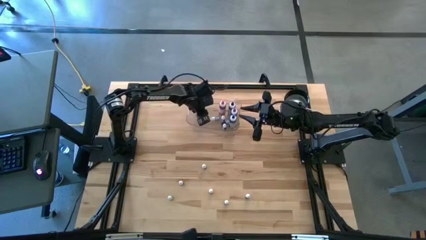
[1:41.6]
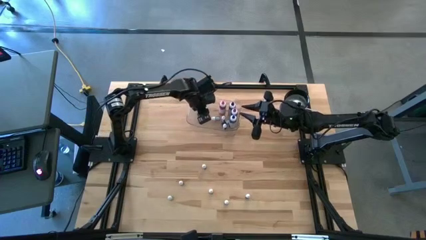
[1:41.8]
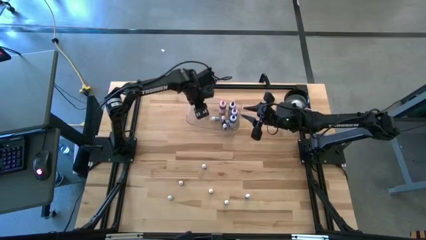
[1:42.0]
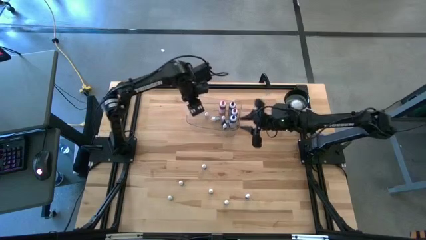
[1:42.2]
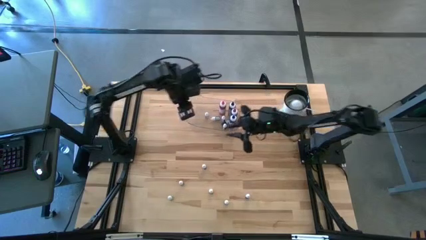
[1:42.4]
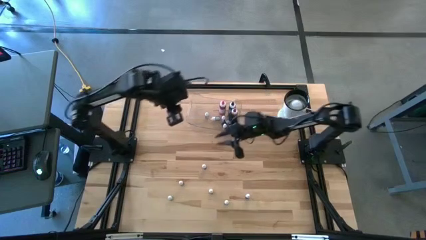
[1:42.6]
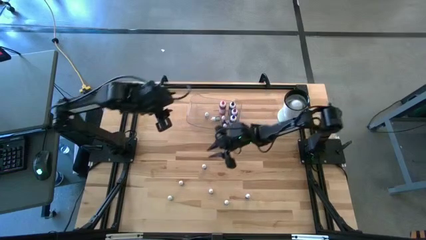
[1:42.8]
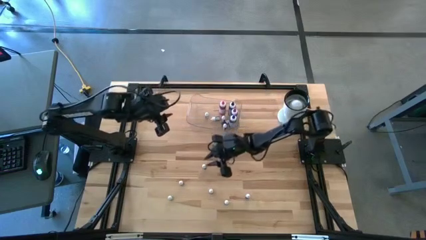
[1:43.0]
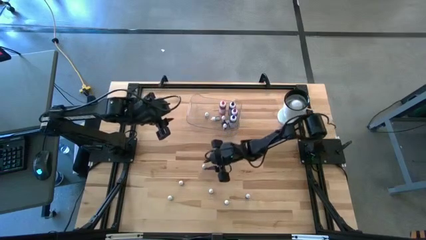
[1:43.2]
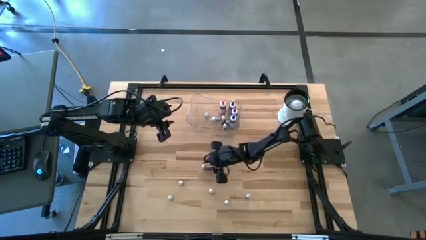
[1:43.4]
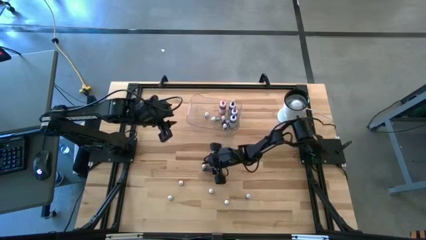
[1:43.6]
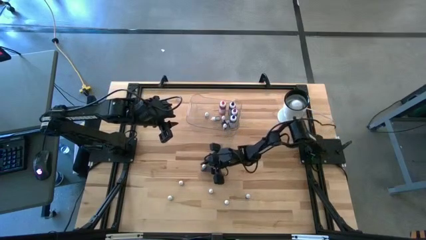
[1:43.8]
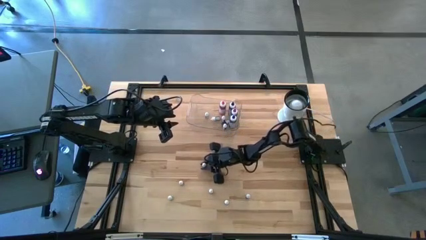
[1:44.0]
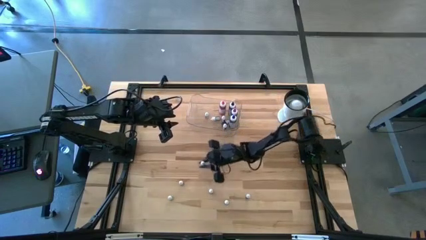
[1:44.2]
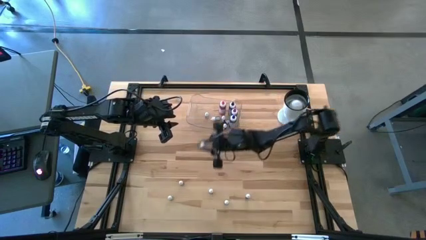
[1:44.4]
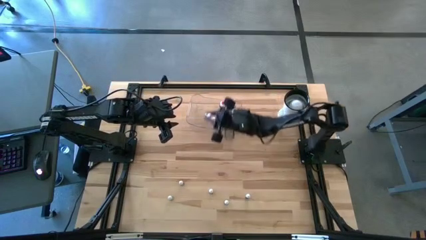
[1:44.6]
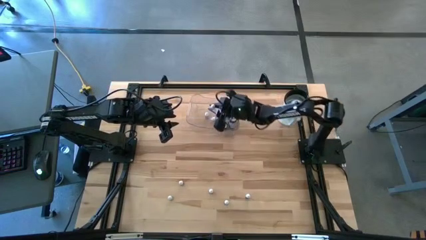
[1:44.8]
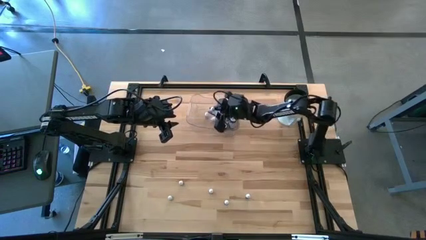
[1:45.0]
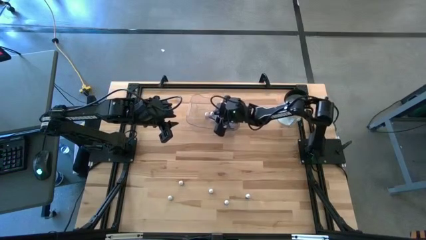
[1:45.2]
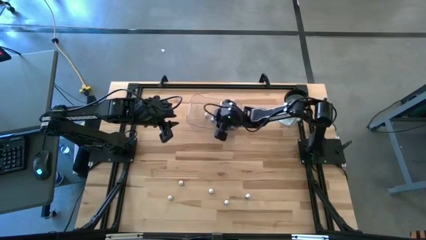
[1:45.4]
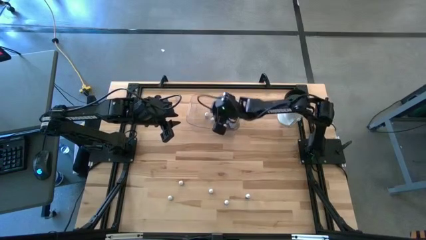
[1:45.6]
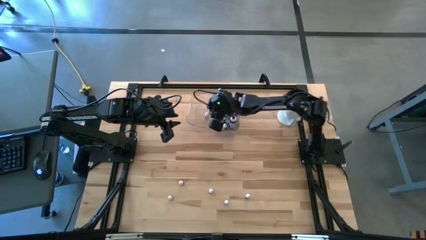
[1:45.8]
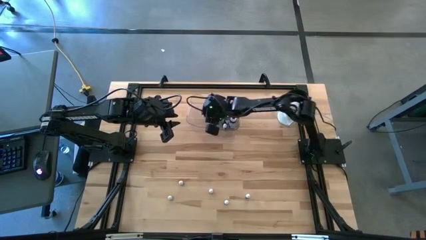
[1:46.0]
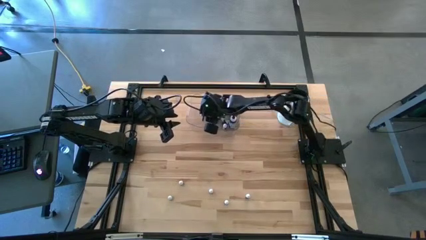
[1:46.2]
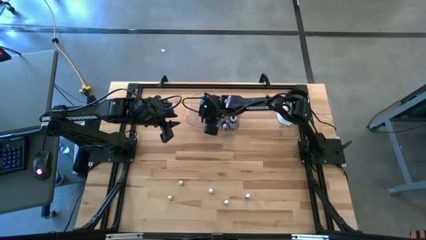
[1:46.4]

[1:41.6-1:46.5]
Task: Pick & Place food coloring
Put the small black food coloring bottle into the transparent bin

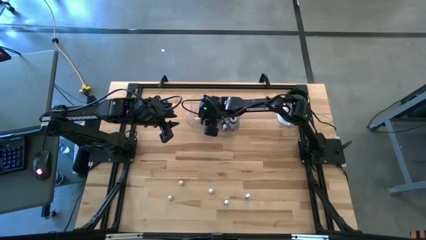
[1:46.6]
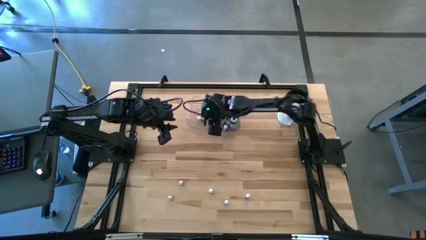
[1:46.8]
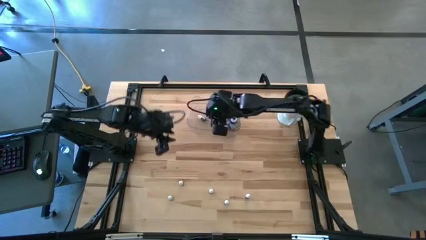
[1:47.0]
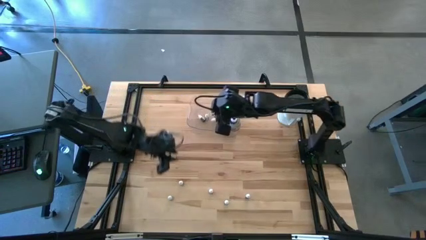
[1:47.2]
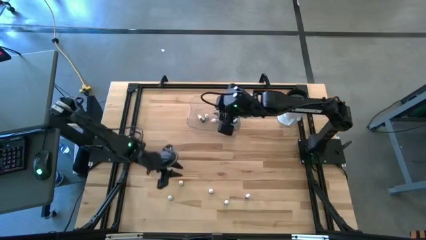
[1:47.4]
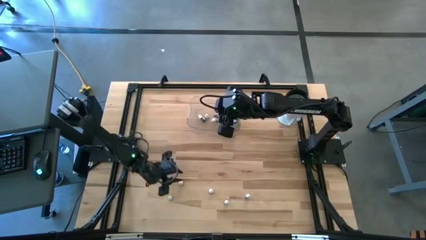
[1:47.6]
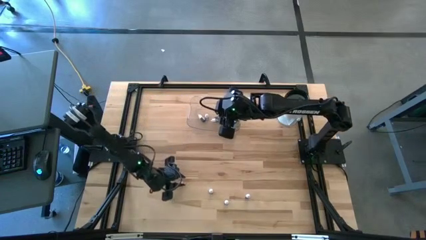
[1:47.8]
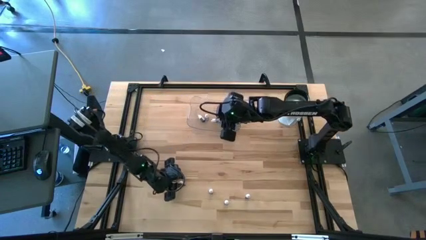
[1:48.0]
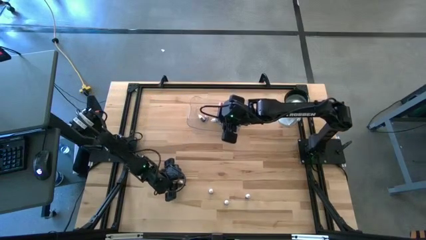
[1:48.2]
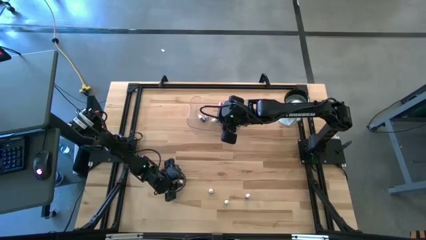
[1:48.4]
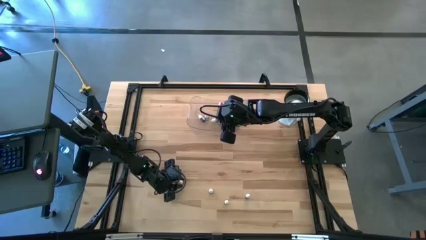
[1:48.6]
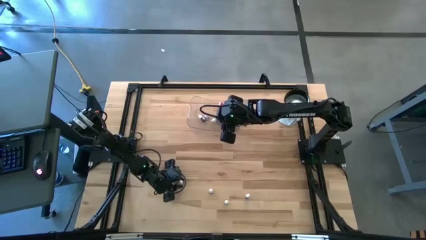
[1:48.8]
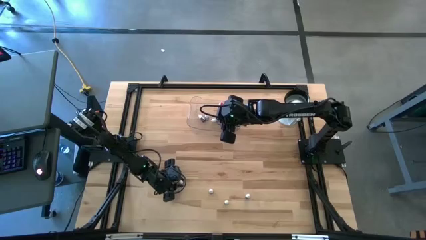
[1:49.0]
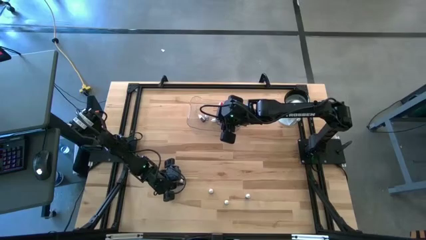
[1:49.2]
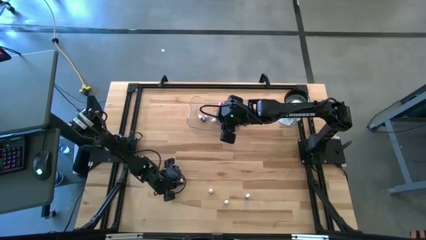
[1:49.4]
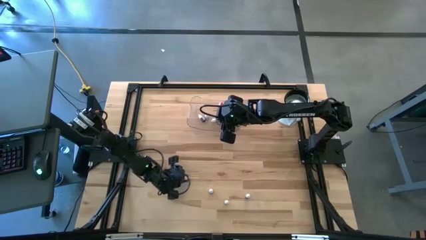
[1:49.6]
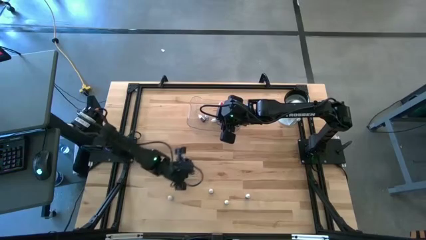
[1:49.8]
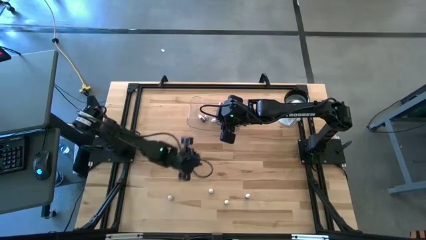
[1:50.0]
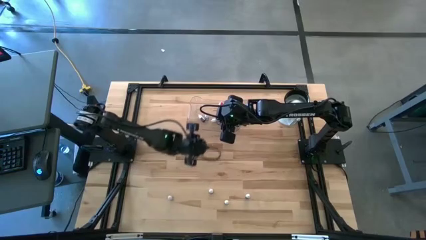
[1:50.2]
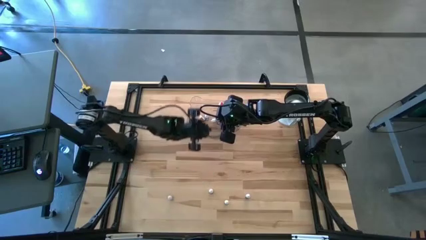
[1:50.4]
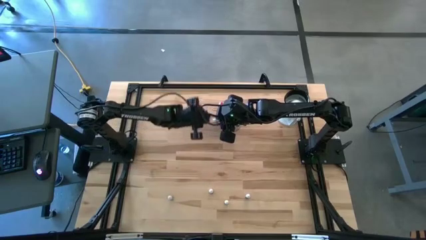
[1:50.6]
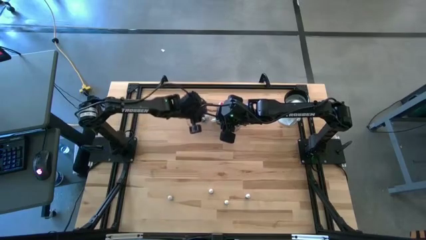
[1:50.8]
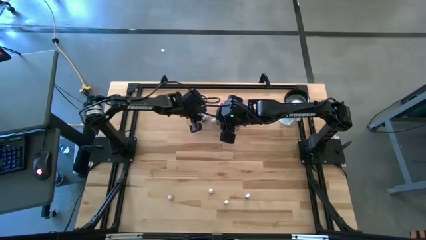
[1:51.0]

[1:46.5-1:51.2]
Put the small blue food coloring bottle into the transparent bin

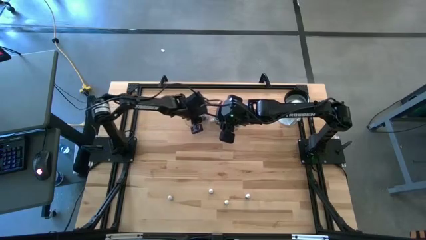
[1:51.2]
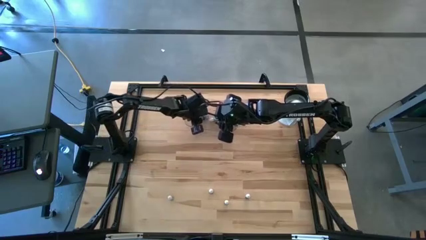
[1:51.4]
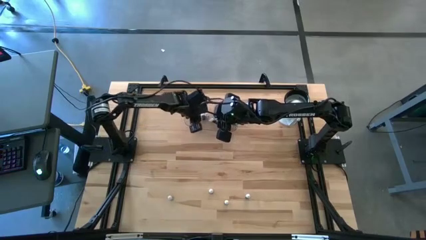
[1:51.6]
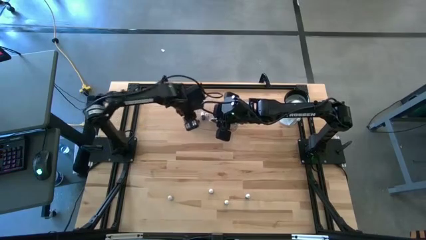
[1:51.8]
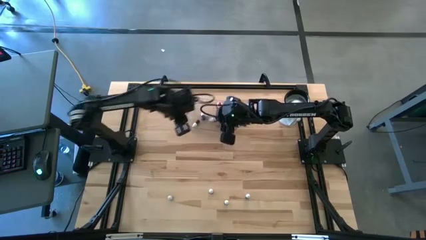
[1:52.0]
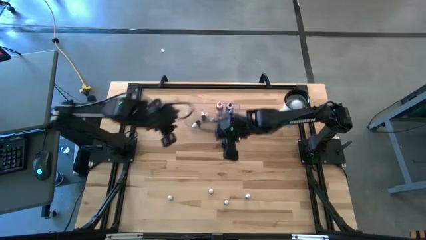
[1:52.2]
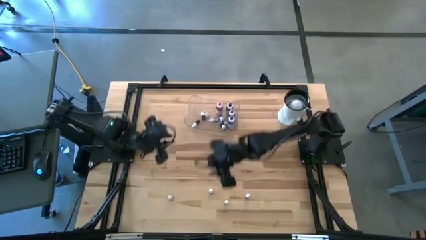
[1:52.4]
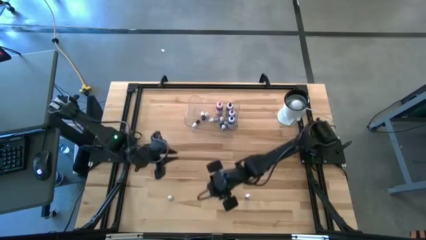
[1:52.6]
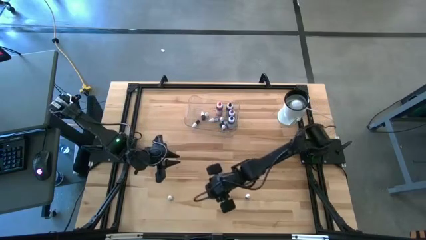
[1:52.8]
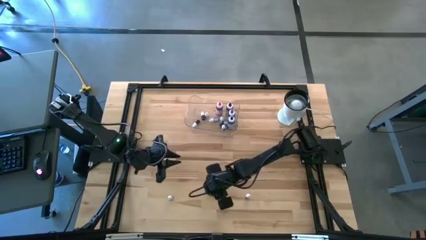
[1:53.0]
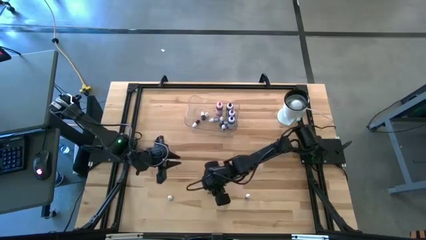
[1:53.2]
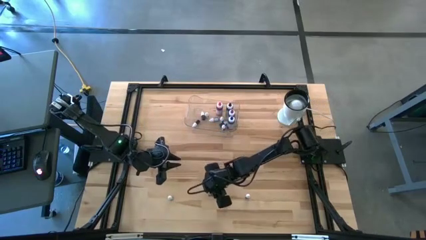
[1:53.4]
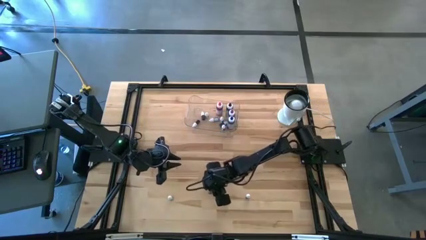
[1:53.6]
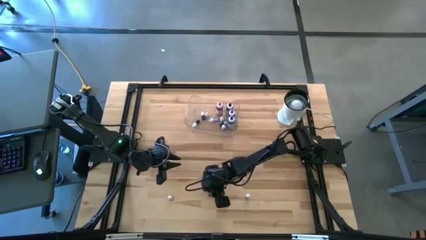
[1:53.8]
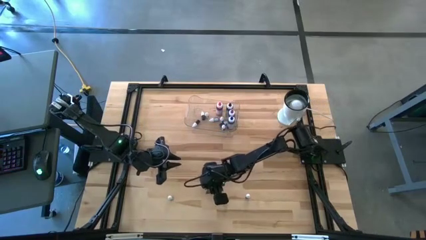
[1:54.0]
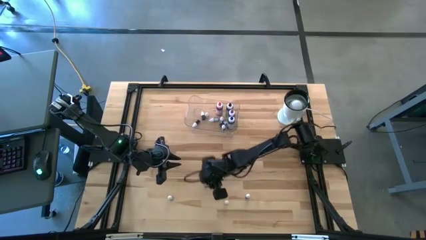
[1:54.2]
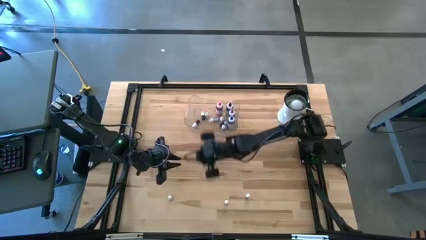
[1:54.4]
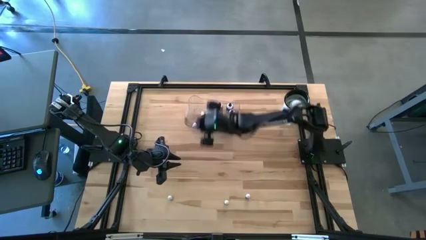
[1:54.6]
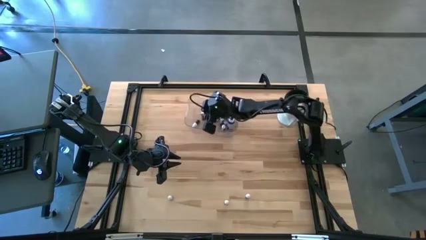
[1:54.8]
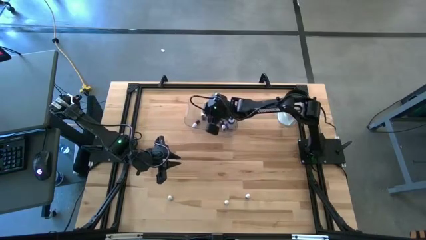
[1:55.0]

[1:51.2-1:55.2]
Put the small red food coloring bottle into the transparent bin

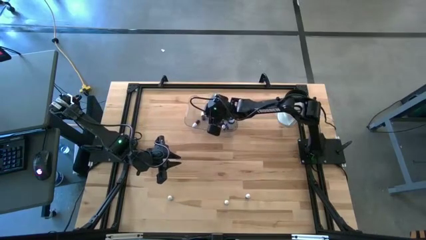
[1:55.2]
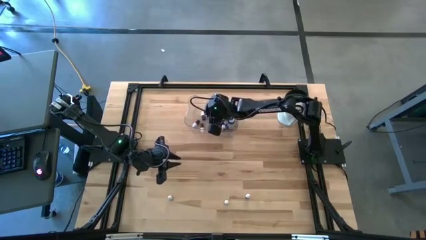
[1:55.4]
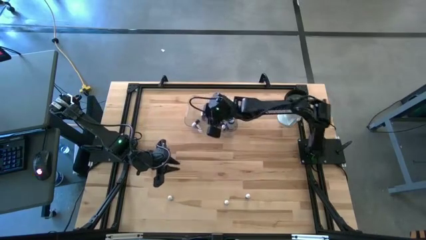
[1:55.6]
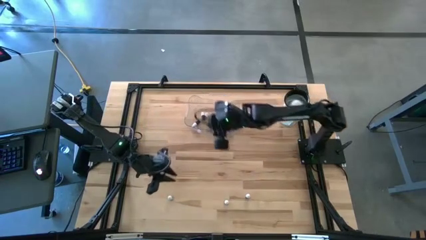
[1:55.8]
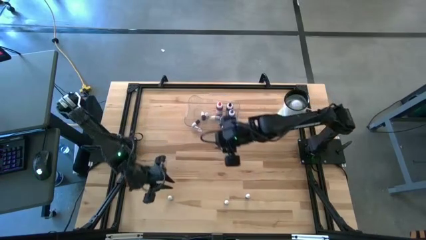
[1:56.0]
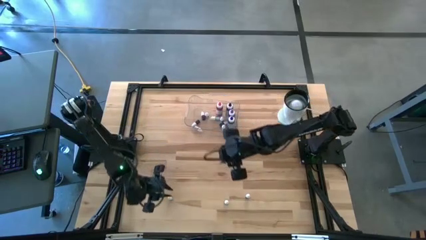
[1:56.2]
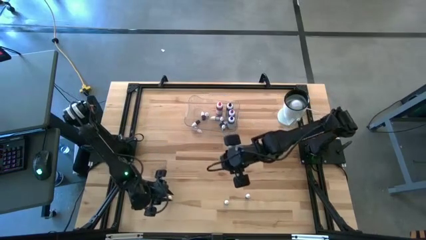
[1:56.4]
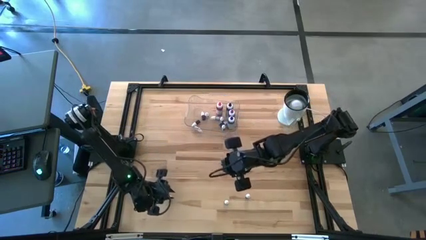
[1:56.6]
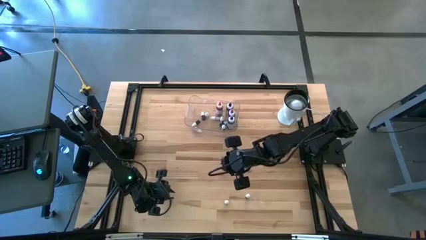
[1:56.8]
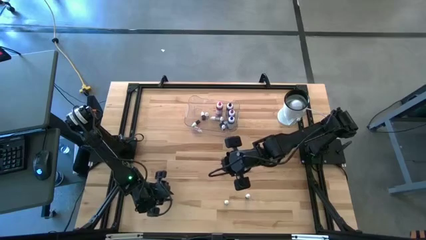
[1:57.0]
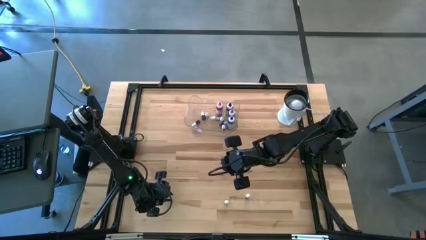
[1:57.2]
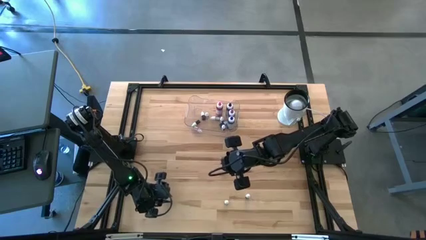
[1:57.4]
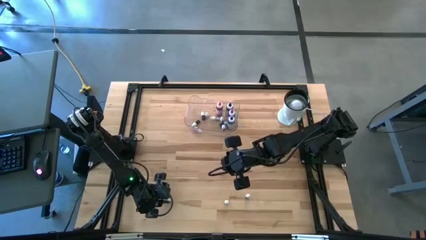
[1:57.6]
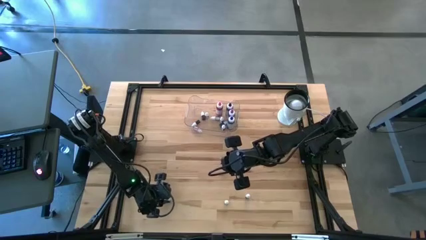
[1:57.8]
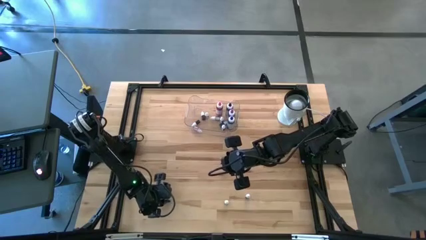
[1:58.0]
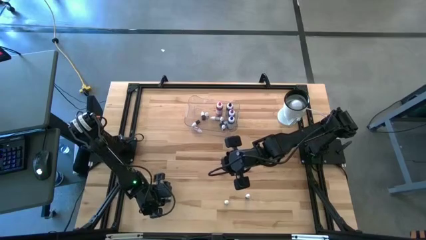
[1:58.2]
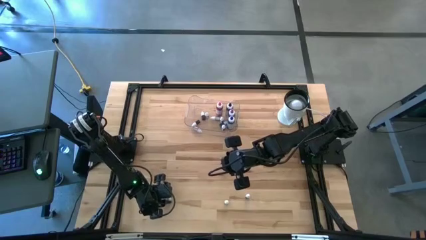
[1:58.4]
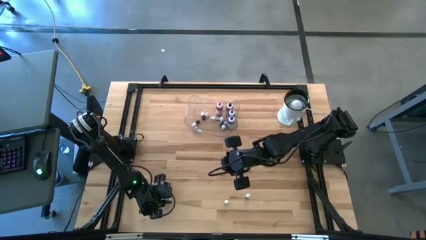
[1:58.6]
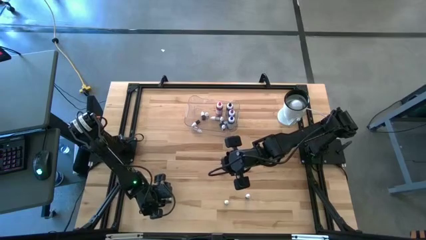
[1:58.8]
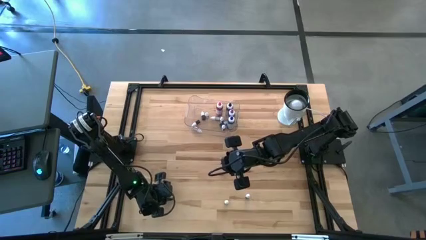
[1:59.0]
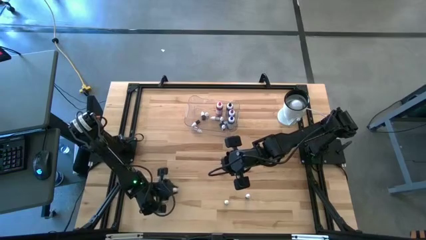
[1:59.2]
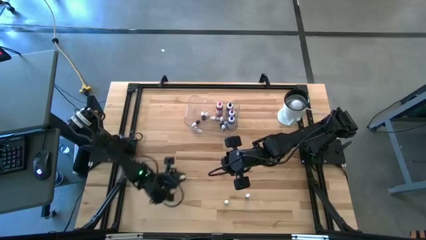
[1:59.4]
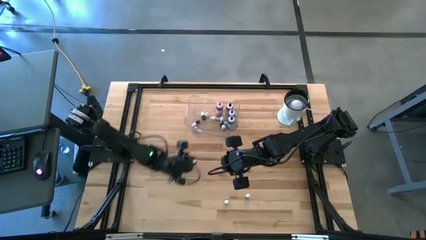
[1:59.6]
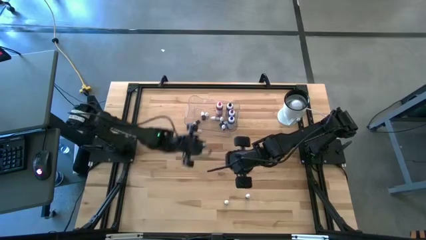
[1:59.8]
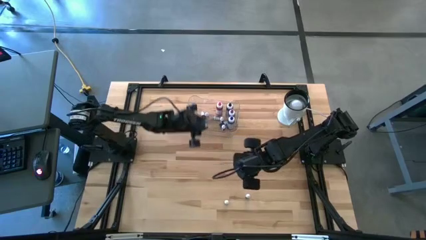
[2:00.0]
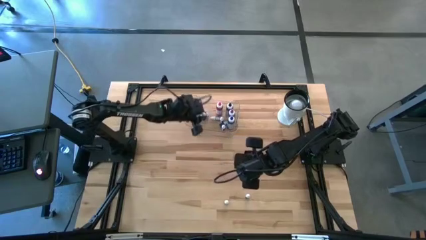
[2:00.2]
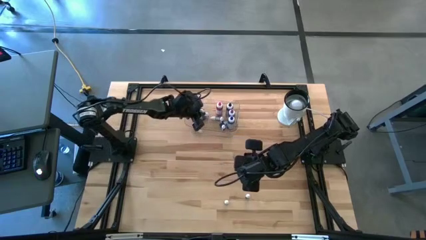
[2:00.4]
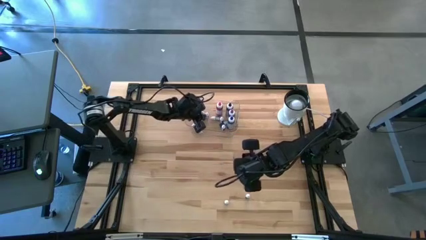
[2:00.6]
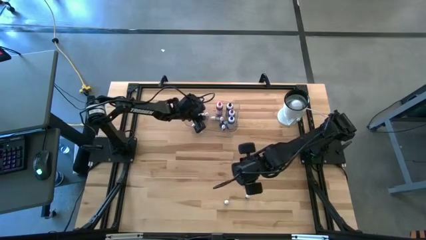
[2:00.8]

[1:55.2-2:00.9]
Put the small blue food coloring bottle into the transparent bin
